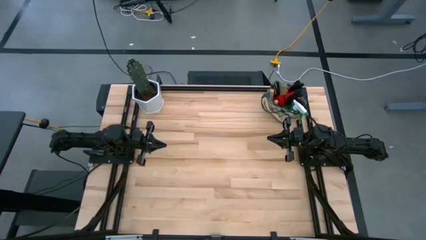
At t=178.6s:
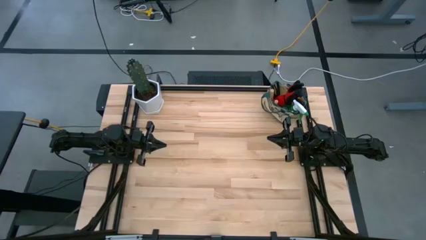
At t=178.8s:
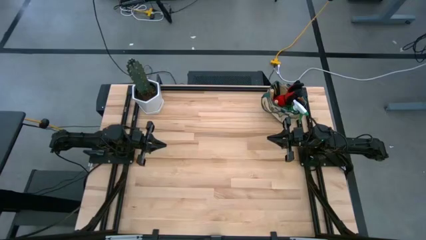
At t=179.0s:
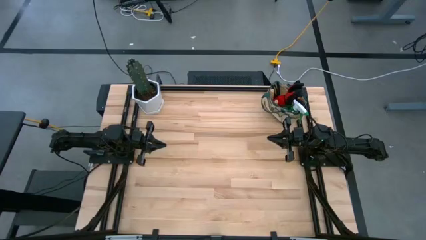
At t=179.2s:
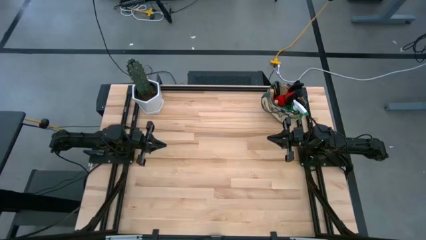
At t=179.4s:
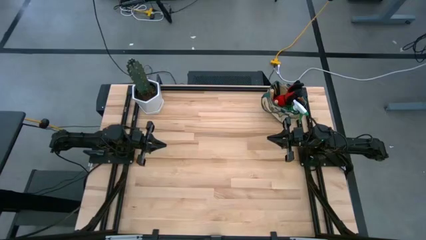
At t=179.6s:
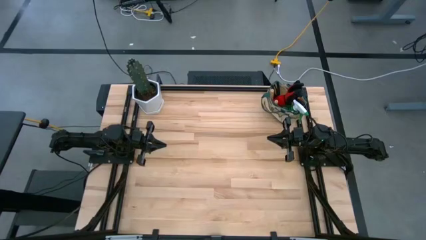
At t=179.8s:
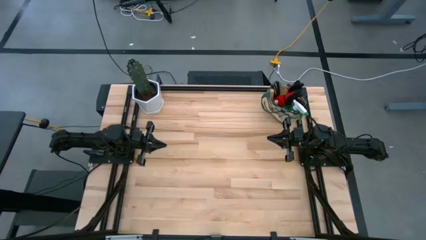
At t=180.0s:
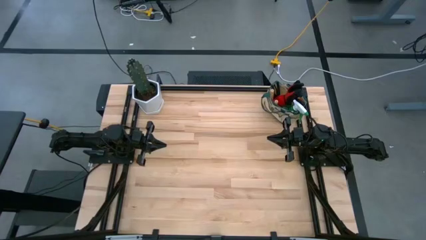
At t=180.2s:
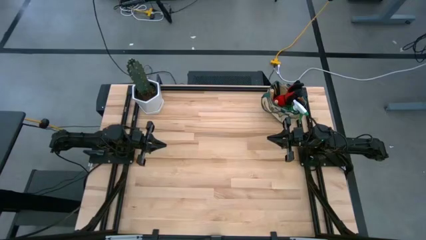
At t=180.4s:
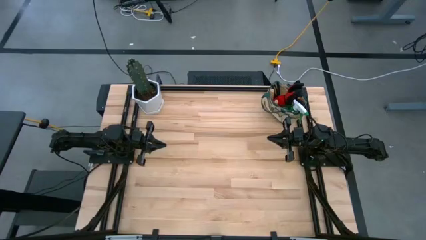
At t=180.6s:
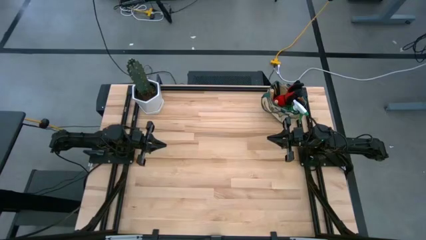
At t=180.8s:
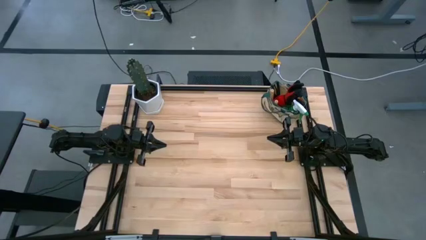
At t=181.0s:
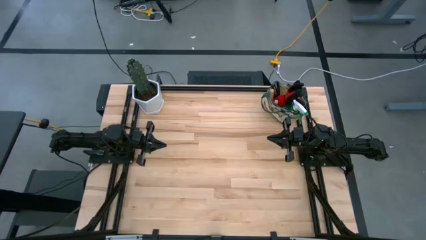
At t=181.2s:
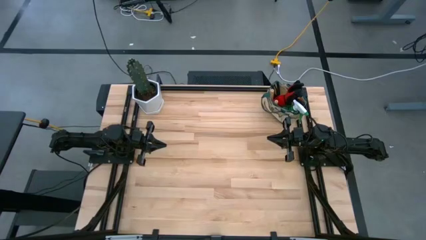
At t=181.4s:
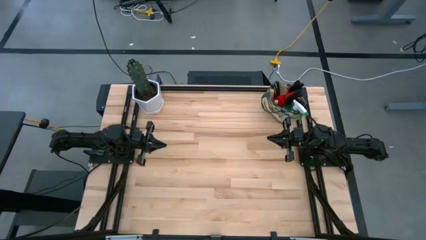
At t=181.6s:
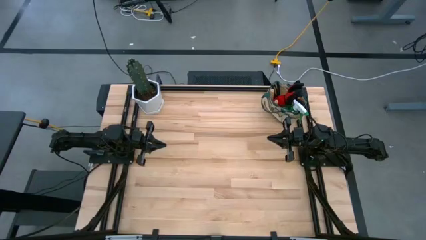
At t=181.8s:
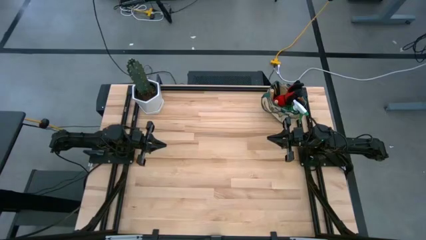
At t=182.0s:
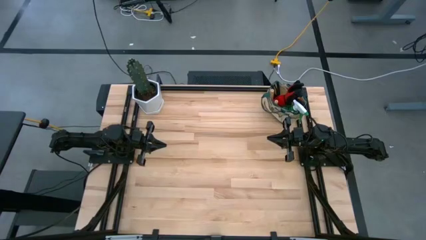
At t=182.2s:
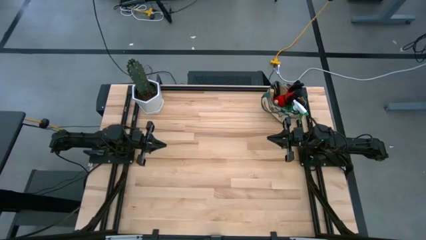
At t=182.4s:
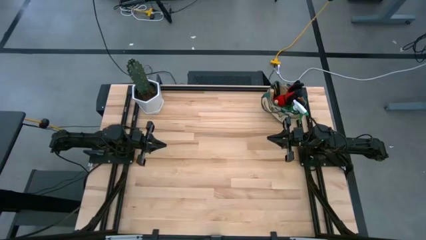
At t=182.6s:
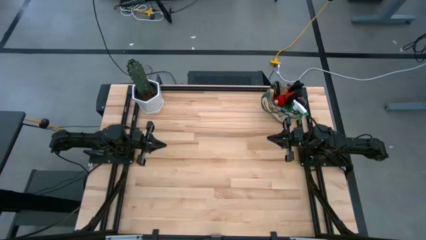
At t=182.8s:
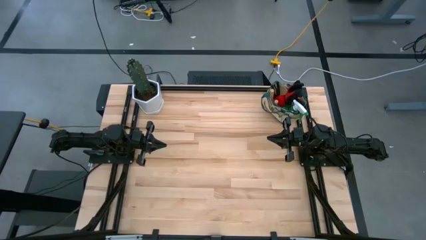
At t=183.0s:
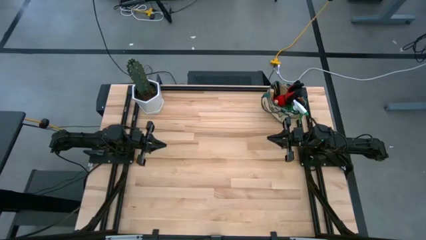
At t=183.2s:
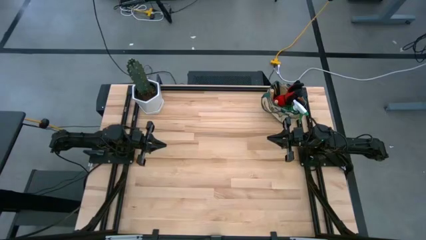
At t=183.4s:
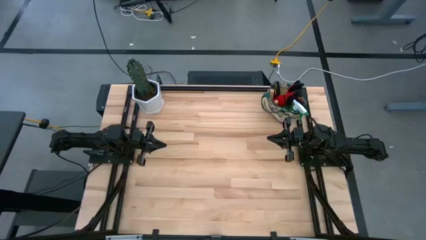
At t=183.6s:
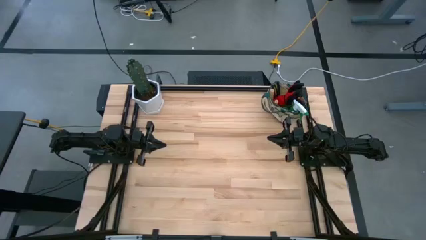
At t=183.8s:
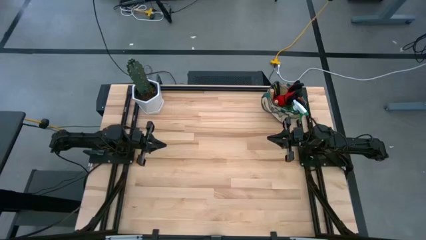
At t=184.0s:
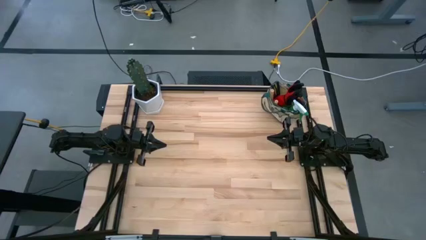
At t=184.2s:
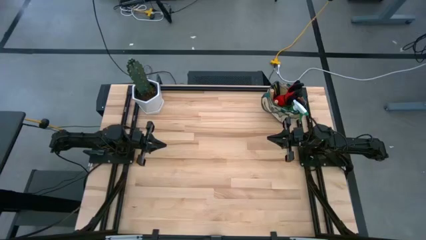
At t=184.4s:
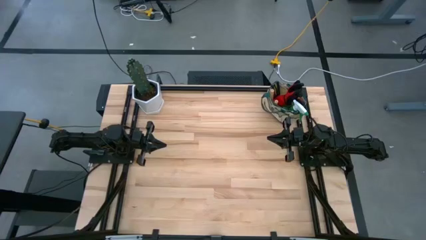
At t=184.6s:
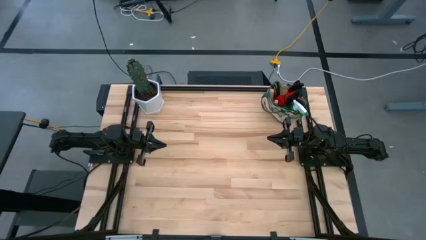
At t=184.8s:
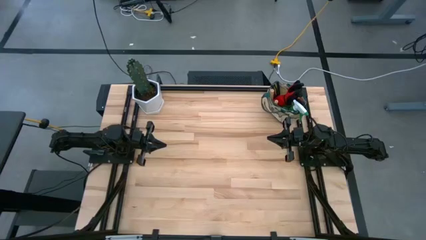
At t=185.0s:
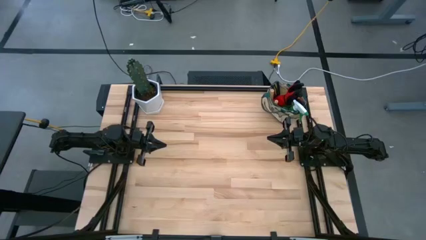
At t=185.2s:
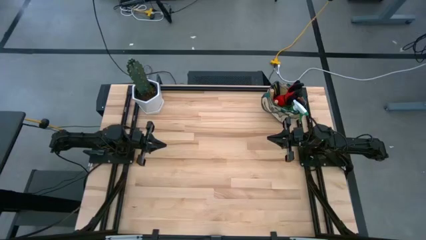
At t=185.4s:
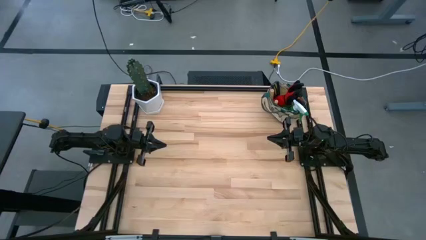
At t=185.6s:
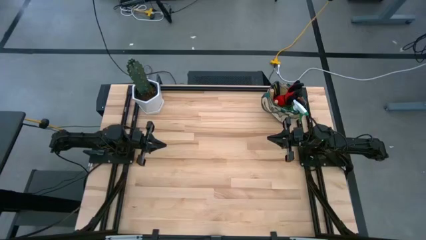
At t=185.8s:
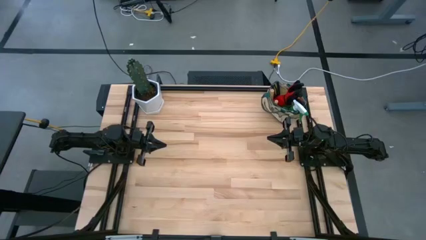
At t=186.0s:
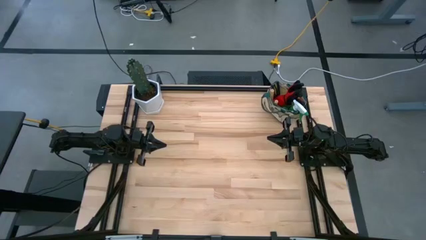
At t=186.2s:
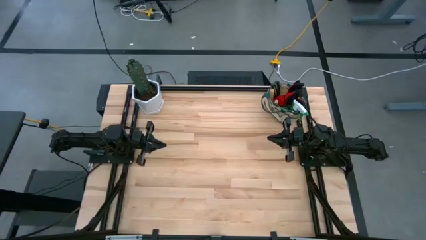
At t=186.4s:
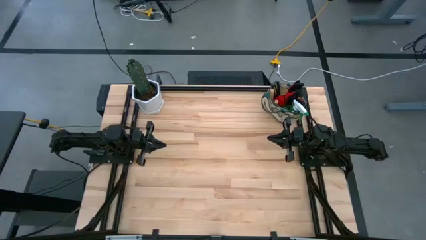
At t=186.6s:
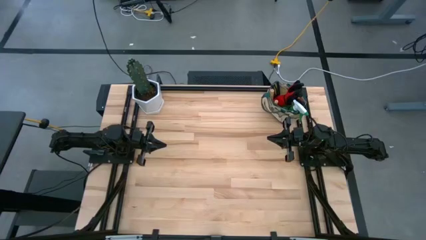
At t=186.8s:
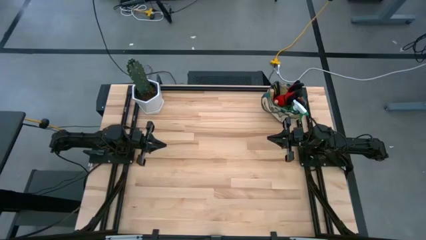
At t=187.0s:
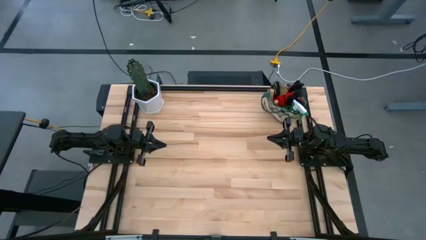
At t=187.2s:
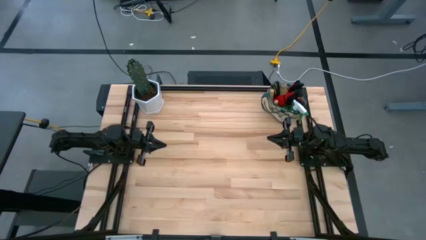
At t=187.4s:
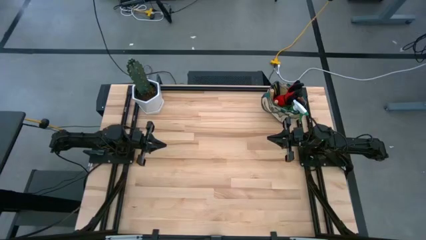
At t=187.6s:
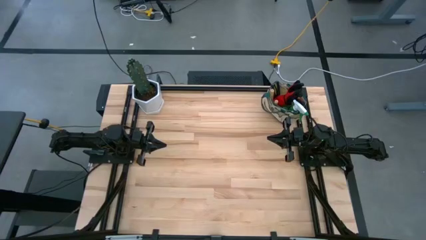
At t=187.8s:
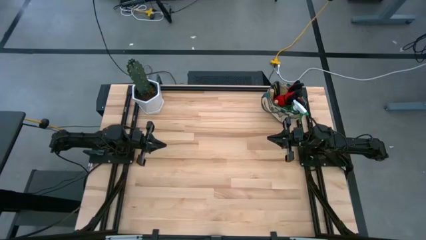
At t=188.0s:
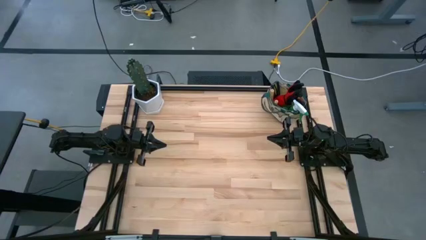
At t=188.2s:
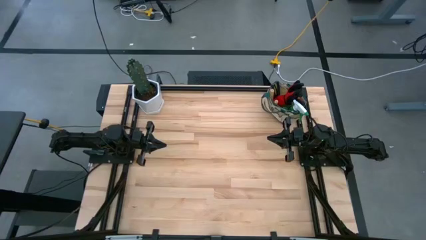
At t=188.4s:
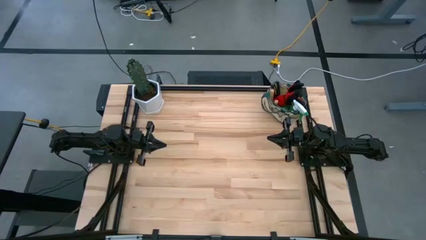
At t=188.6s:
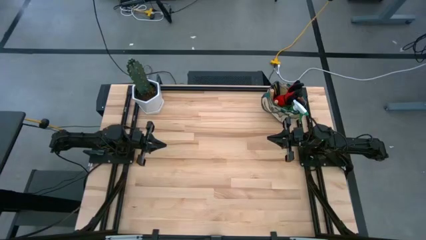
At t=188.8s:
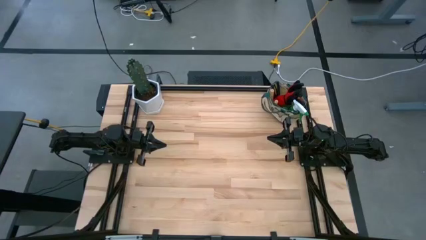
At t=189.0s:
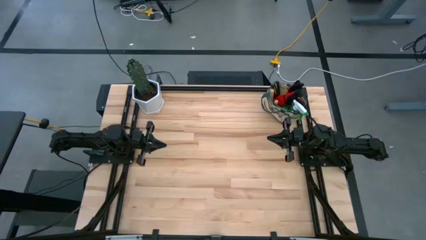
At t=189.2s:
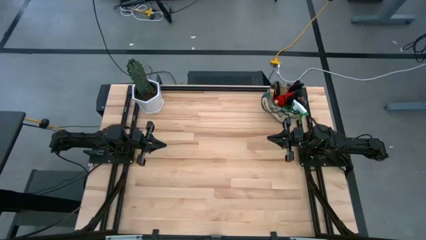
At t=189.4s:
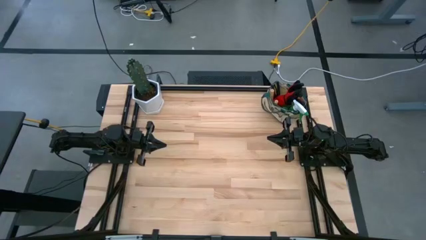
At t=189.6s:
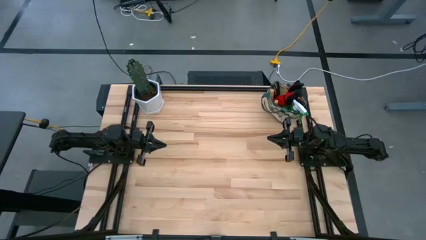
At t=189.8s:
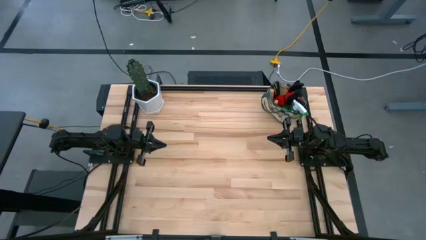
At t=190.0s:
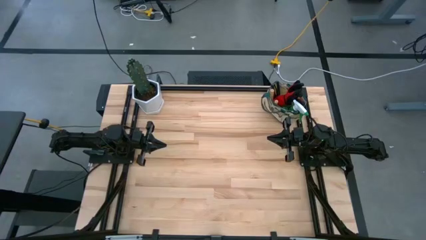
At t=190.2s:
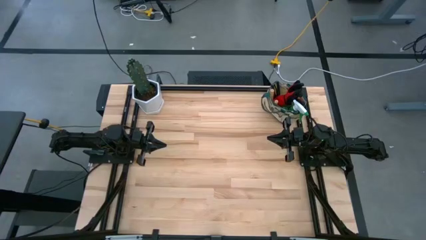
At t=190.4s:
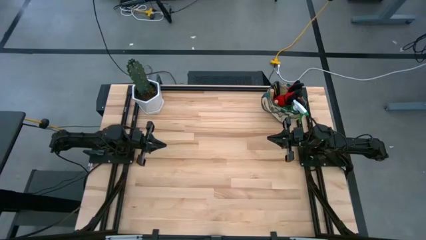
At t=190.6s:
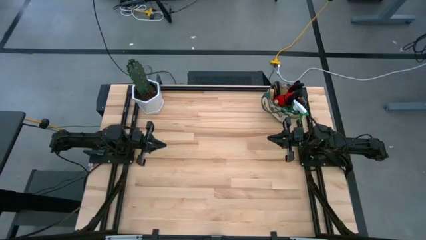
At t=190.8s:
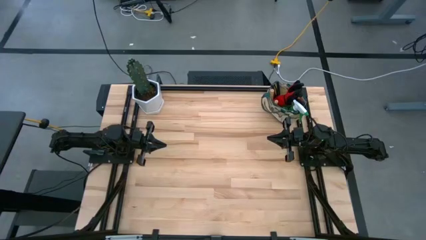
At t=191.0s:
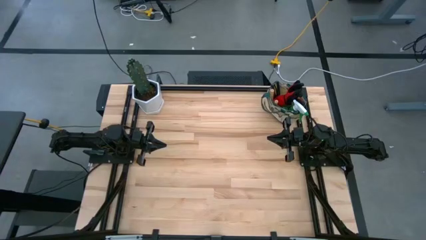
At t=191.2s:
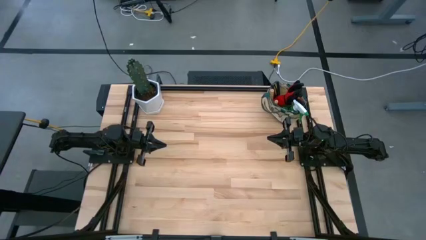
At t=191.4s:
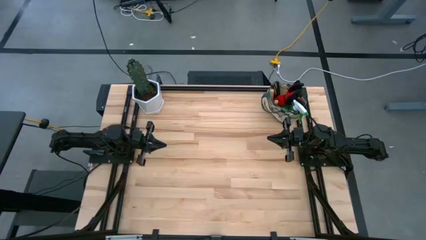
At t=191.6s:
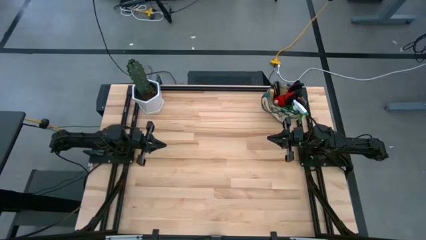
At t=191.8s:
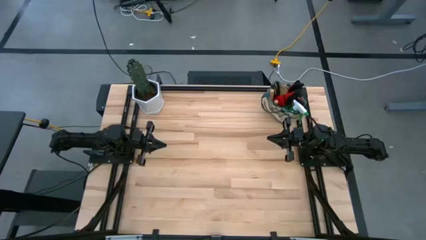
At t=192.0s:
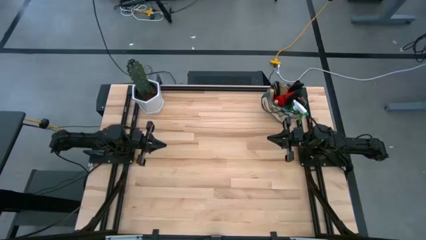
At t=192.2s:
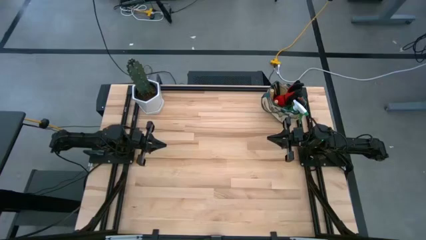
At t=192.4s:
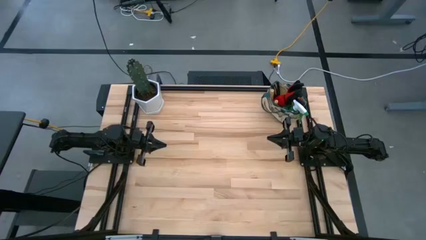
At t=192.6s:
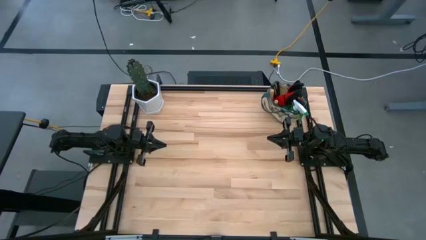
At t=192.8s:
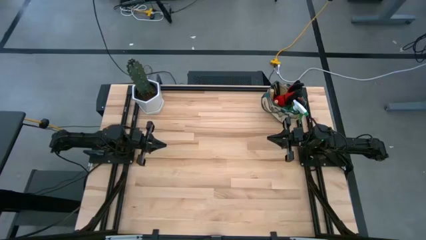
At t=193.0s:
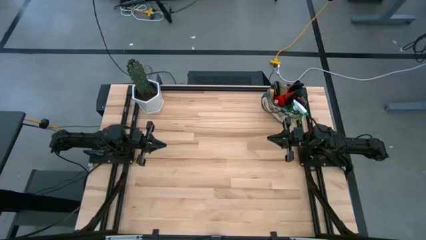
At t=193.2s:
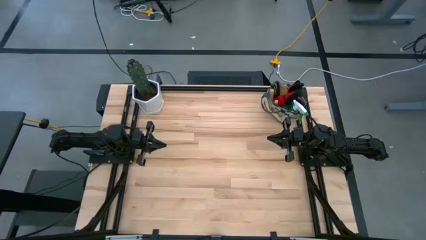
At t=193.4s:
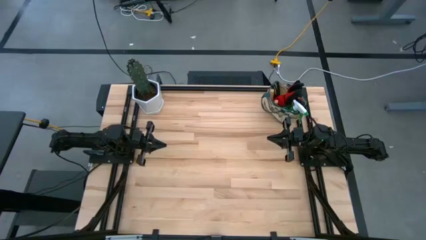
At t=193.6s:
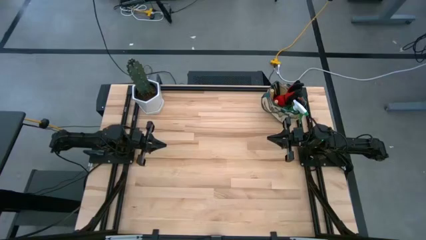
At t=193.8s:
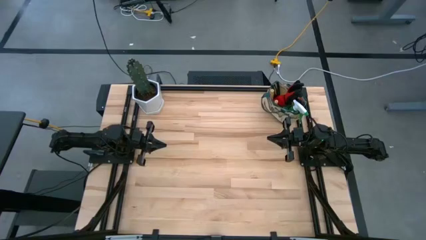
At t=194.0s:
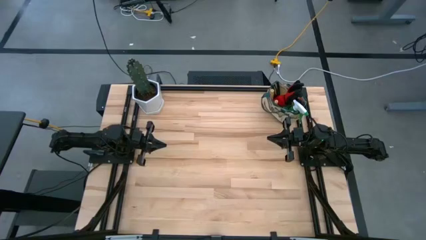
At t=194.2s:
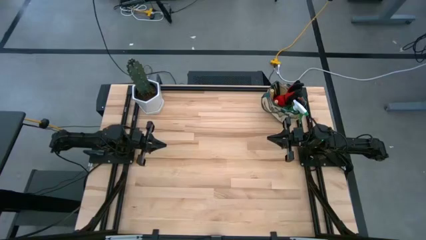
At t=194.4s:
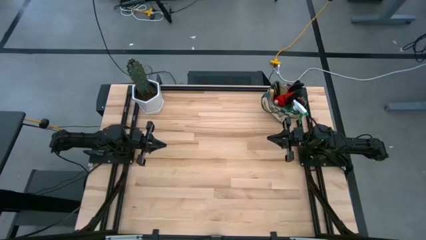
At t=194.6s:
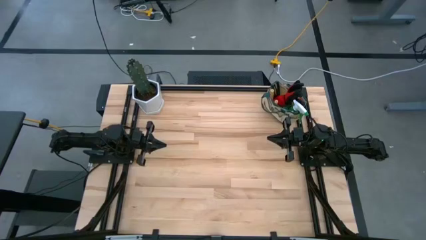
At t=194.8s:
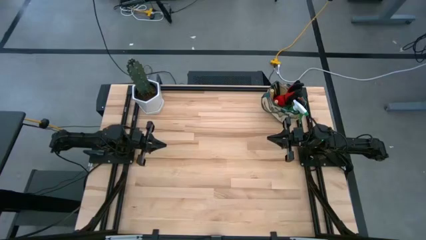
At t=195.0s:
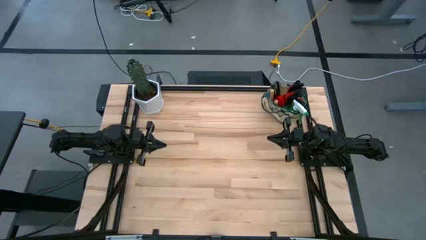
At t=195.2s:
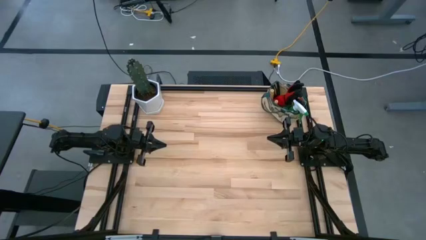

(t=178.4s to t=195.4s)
Task: Pick & Place Garden tools in Gardening bag
Return to Home Position

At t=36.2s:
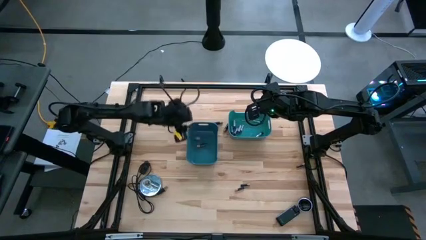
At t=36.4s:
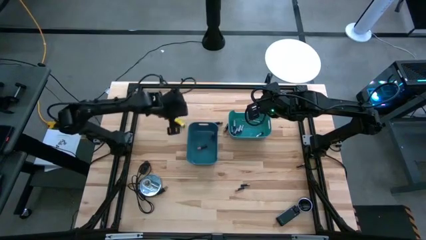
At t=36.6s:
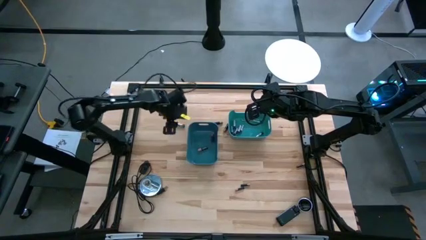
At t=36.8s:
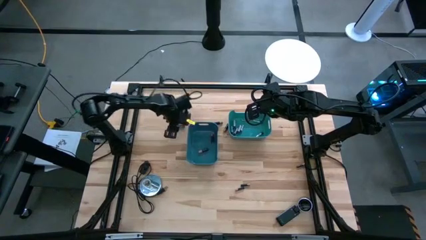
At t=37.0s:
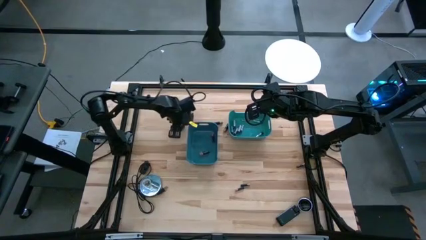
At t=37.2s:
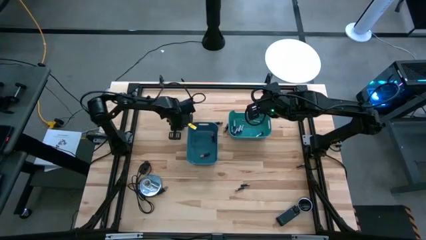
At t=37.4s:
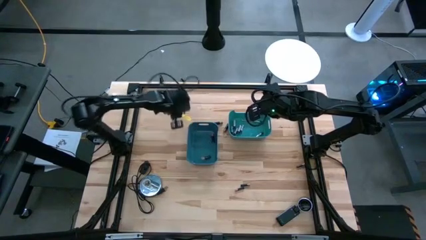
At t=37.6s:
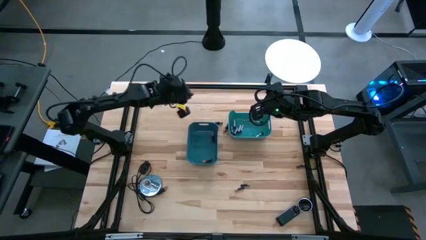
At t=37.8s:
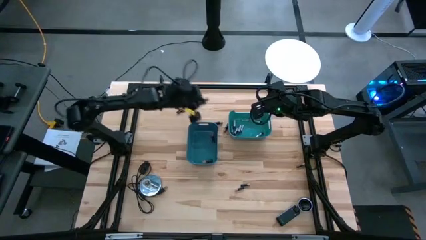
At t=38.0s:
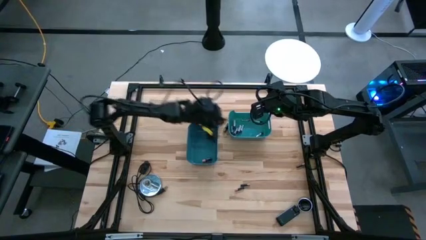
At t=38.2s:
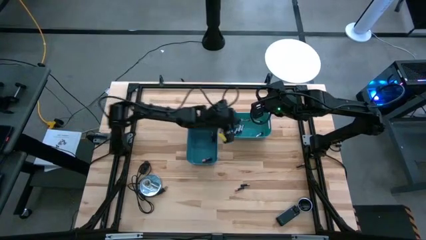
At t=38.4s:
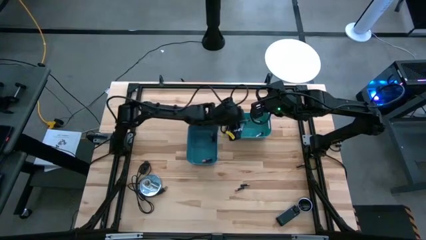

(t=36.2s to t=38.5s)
Task: Sort batteries
Put the silver battery into the green bin
